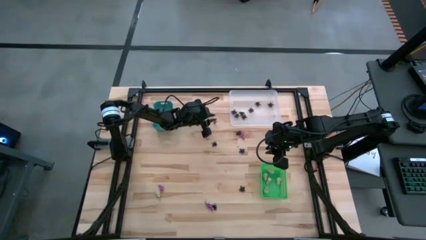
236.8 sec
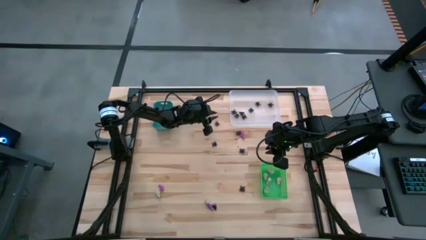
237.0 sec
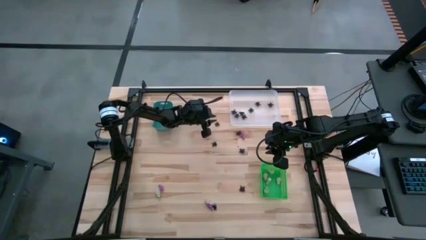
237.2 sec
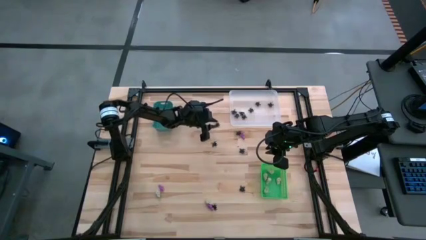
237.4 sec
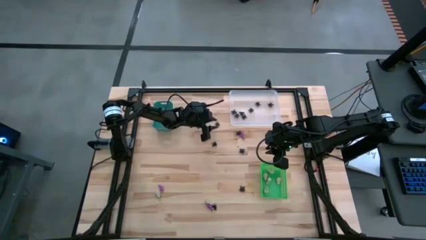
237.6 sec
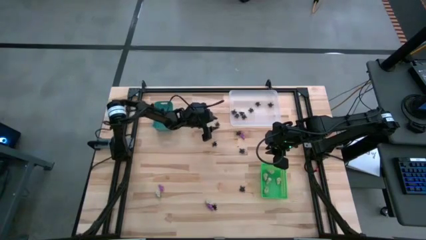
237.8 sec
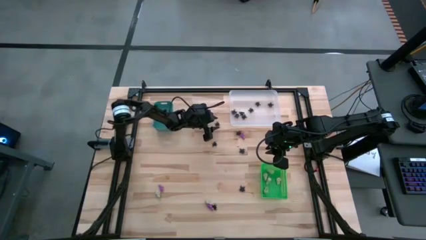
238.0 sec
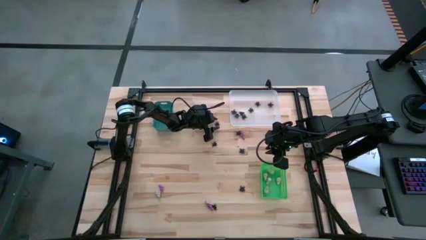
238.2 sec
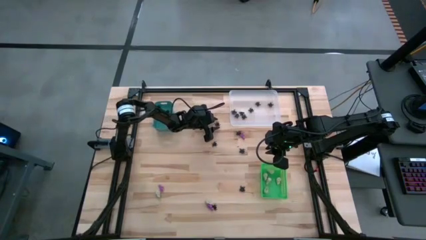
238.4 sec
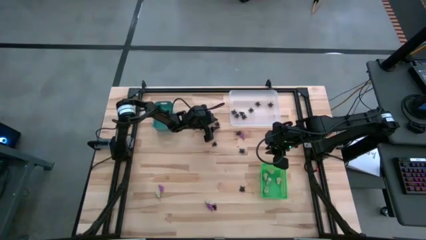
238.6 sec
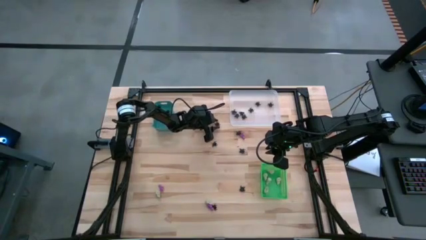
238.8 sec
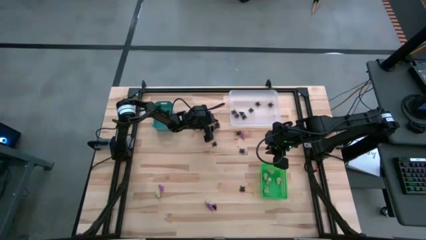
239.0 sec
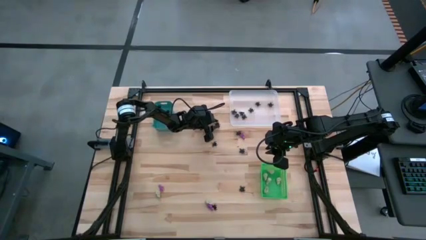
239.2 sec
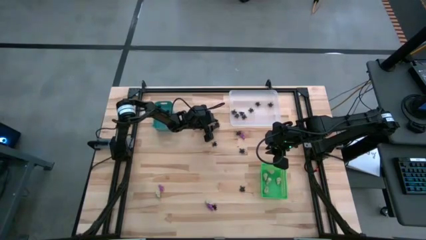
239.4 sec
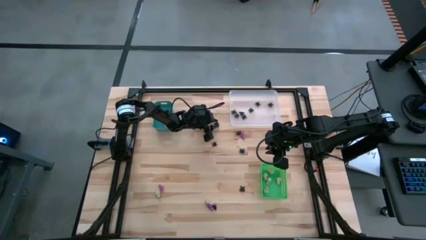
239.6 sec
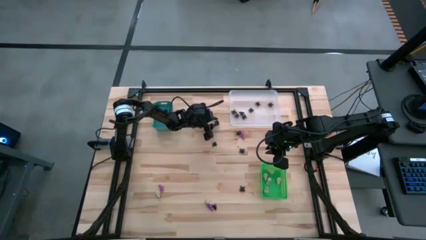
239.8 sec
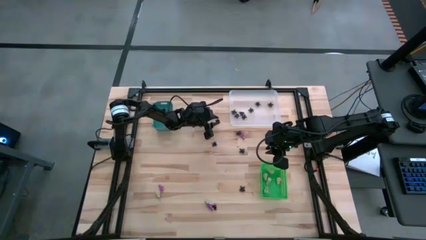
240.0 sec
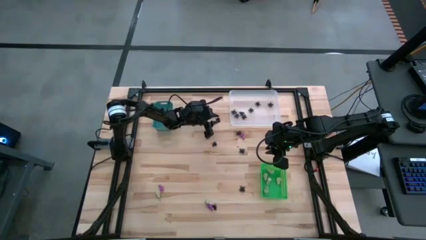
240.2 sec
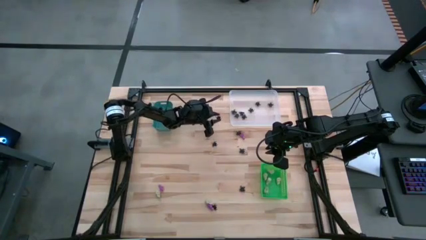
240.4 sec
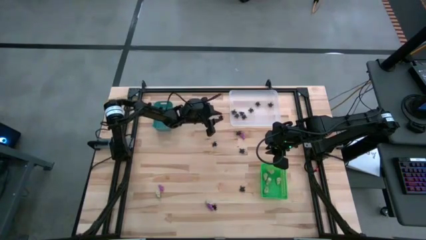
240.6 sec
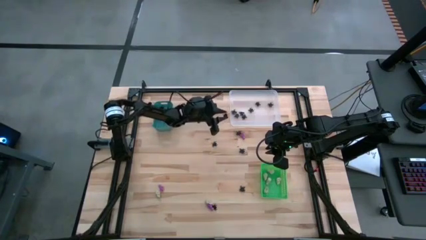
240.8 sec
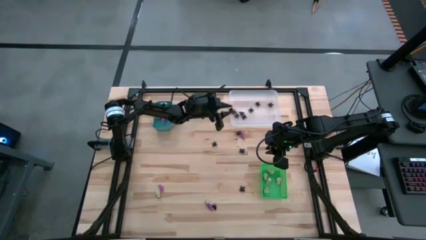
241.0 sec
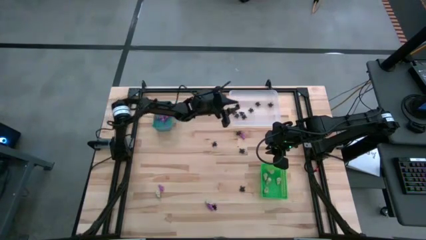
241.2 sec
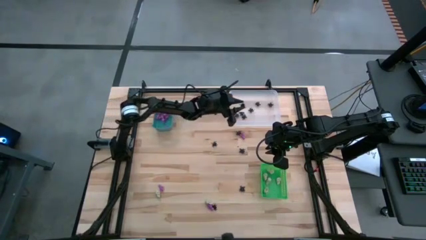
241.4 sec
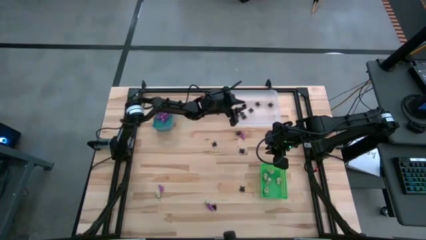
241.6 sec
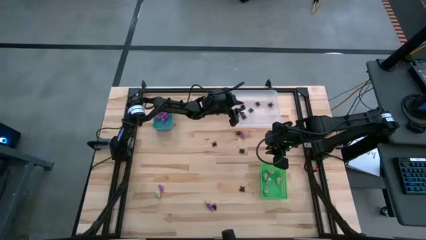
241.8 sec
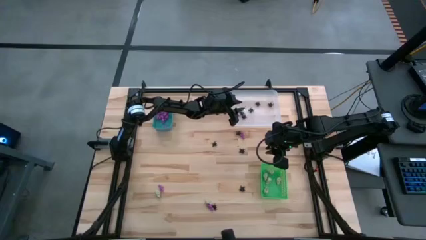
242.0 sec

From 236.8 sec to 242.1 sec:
Task: Sort Halloween decoration
Put the black spider toy into the white bin

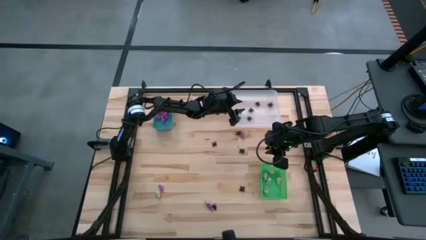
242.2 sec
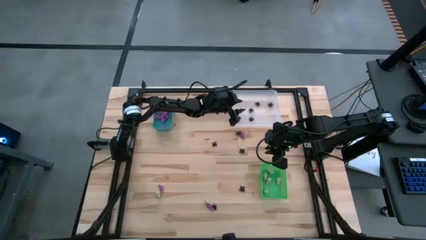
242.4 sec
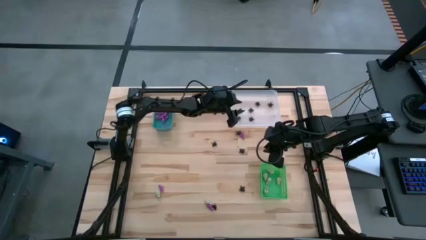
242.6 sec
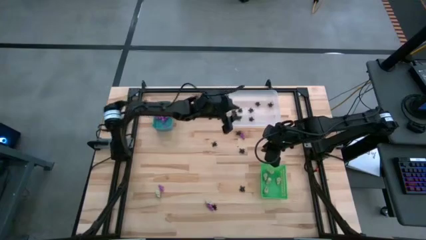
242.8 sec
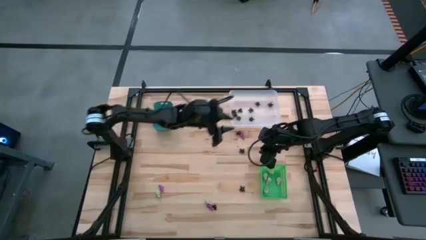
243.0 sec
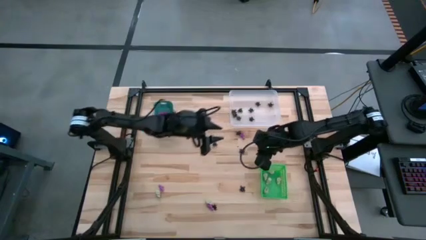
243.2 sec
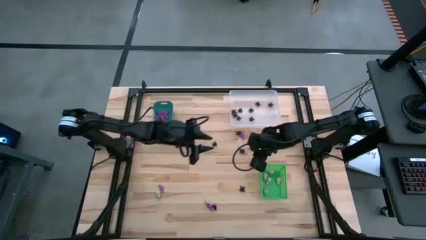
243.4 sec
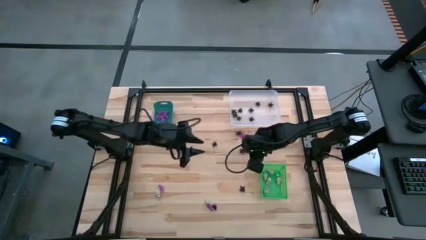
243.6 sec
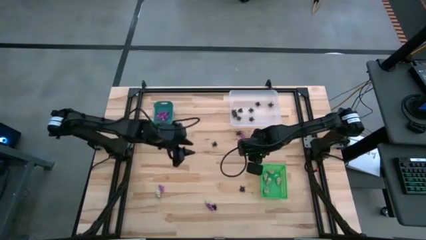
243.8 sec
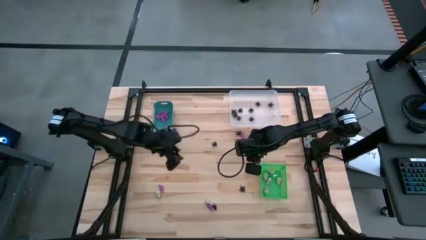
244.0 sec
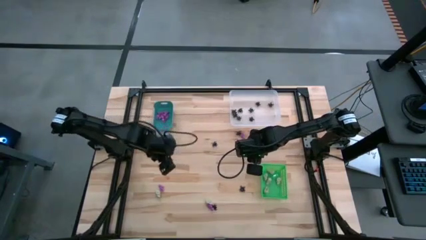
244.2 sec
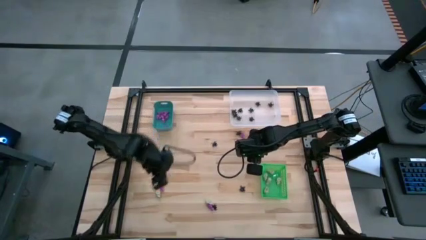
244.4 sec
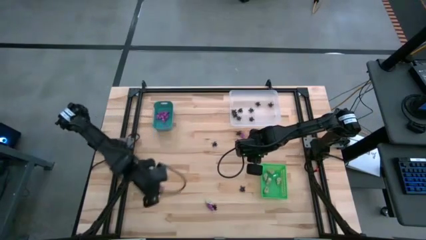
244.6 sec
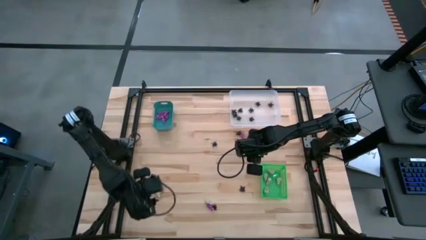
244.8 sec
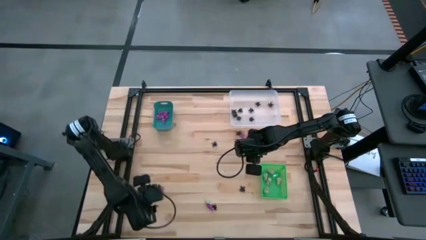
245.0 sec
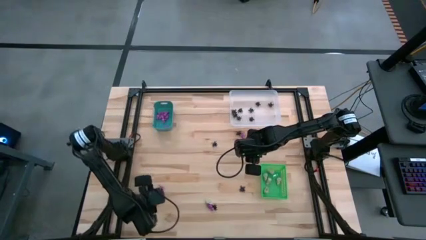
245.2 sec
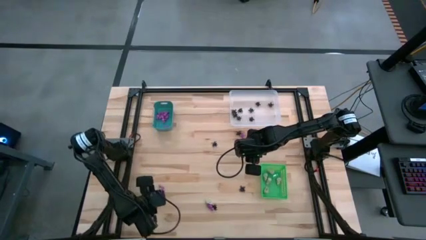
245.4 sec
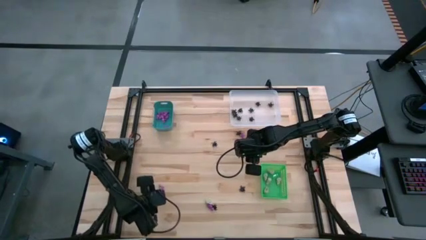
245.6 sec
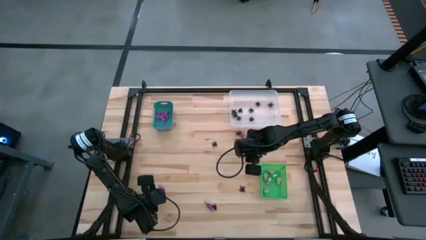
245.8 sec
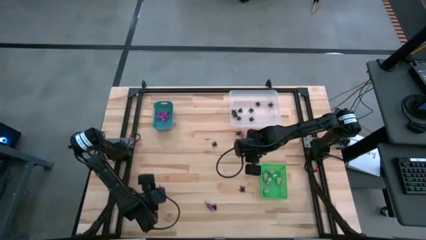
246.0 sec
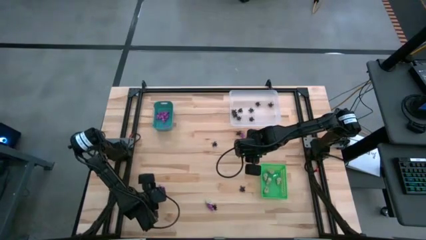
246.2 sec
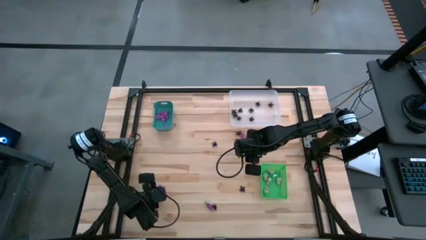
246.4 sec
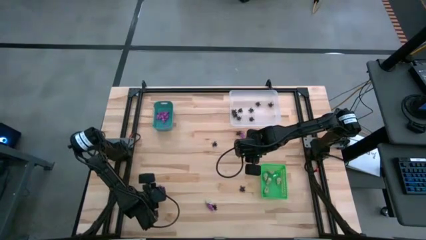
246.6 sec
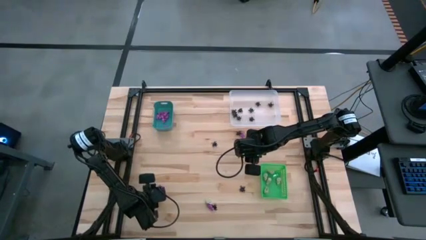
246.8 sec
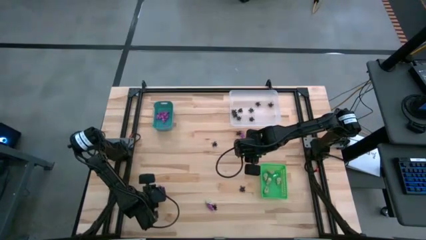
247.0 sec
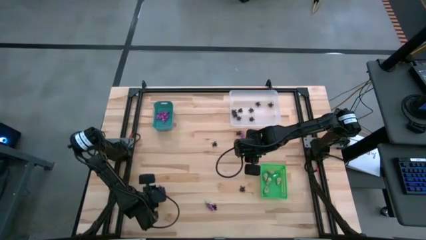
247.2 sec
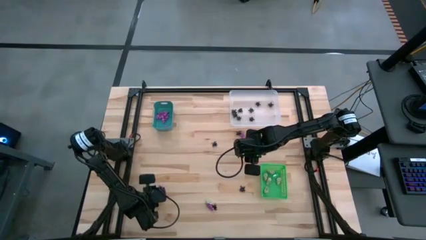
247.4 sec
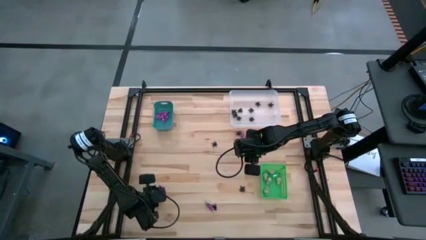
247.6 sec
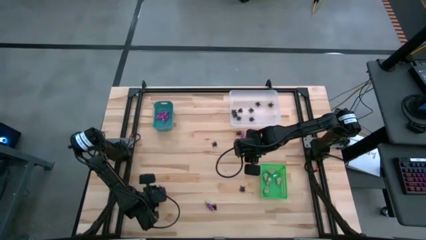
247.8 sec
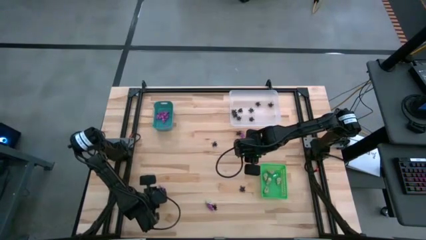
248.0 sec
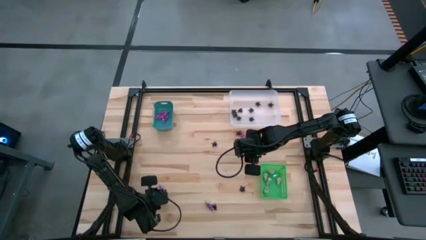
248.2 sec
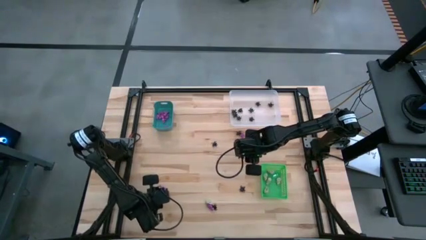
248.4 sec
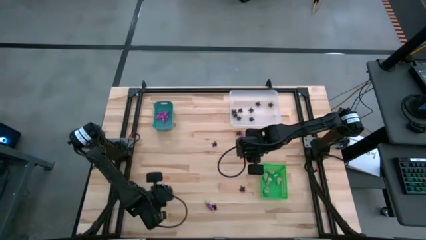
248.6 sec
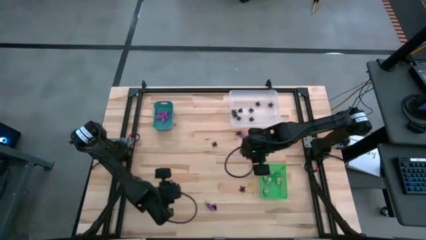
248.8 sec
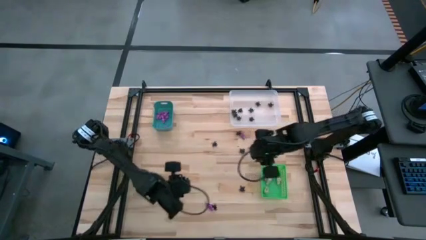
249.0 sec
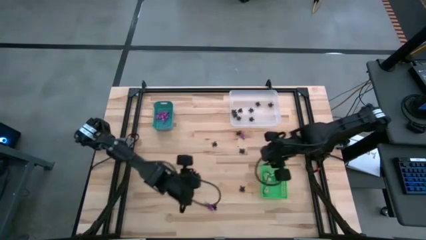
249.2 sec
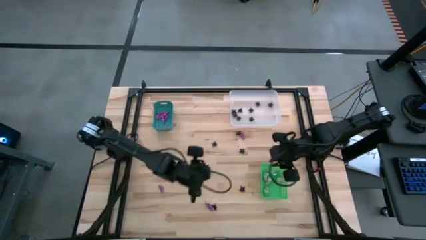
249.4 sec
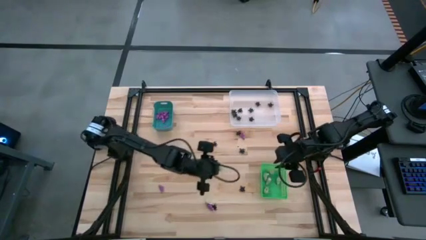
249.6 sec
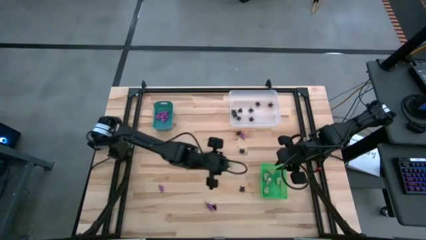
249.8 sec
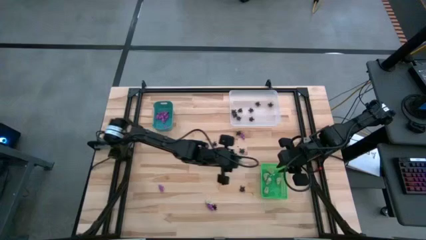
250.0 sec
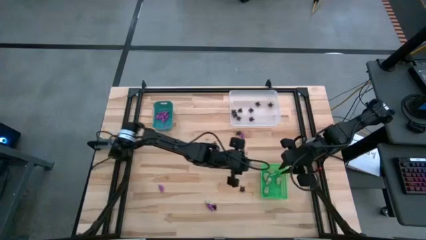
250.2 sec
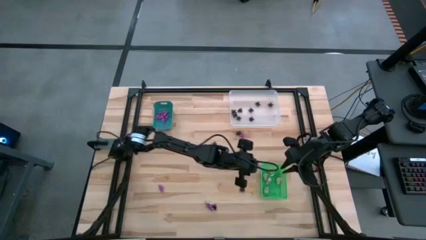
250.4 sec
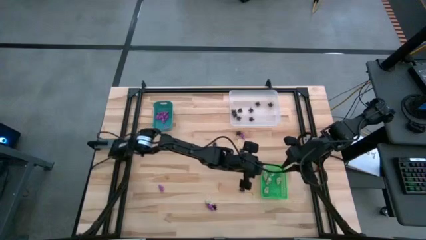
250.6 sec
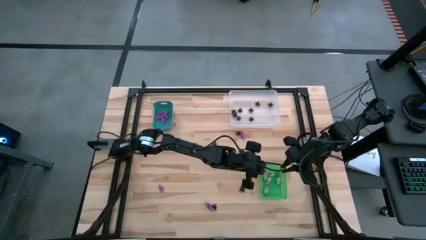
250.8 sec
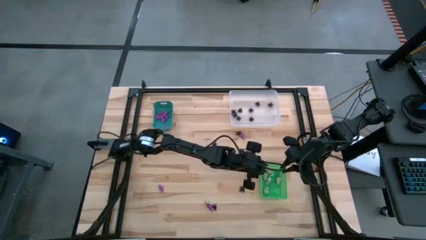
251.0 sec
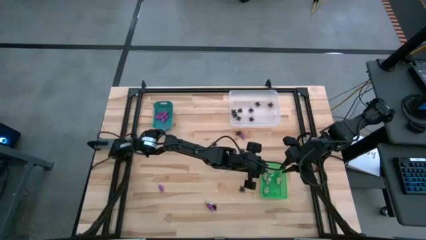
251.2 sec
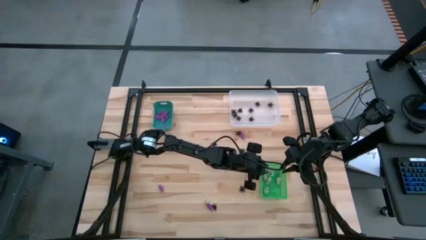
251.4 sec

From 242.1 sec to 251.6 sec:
Put the white skull toy into the green bin
